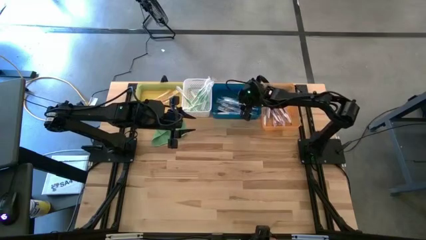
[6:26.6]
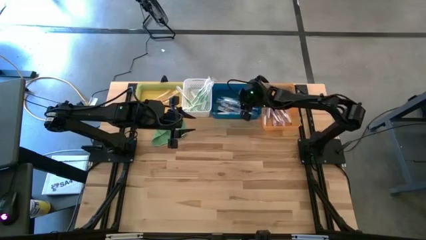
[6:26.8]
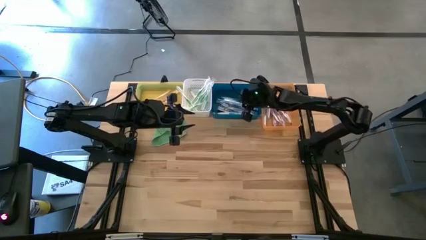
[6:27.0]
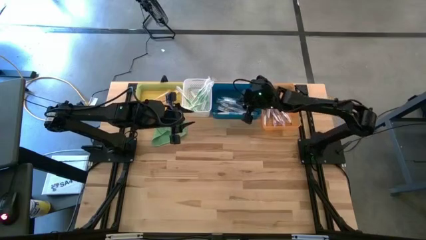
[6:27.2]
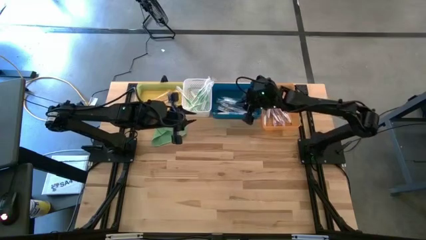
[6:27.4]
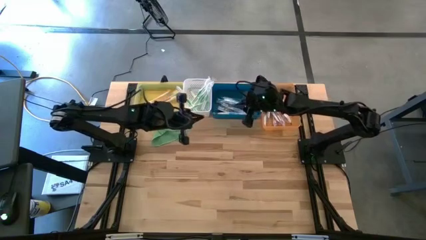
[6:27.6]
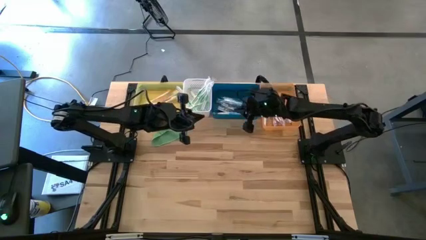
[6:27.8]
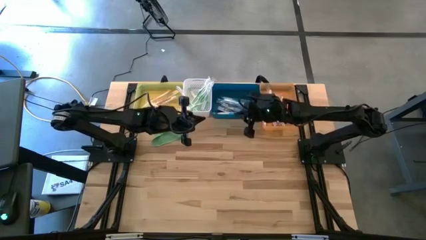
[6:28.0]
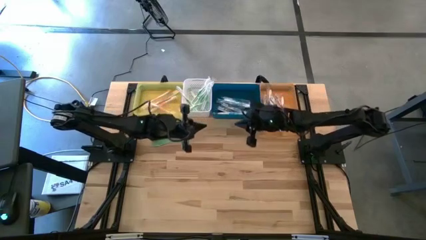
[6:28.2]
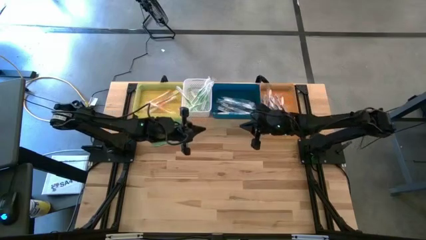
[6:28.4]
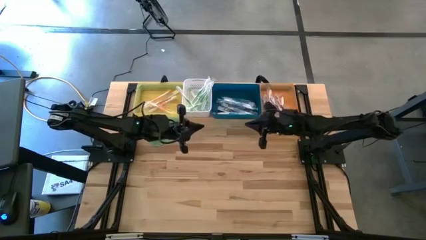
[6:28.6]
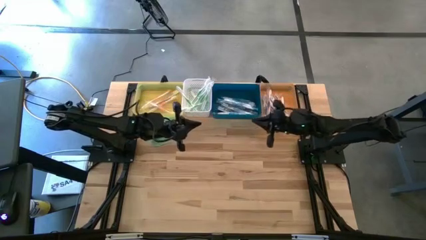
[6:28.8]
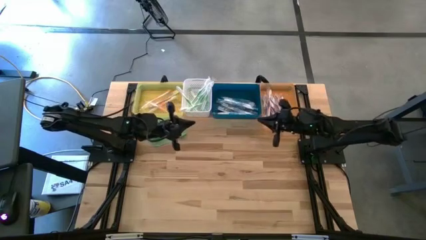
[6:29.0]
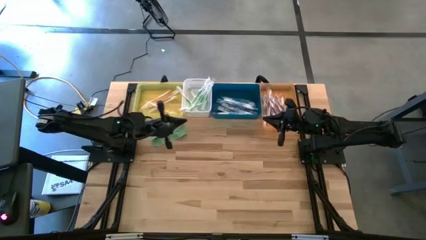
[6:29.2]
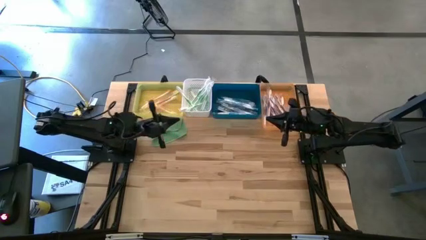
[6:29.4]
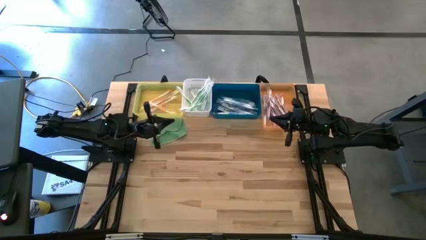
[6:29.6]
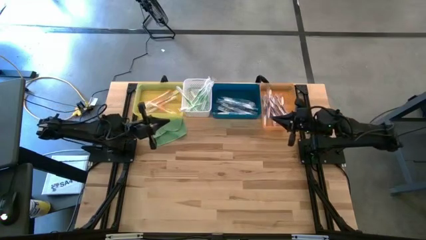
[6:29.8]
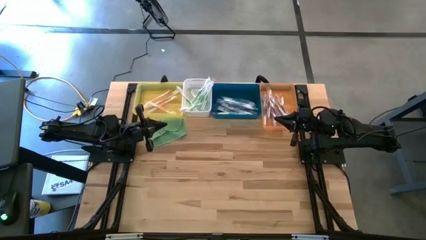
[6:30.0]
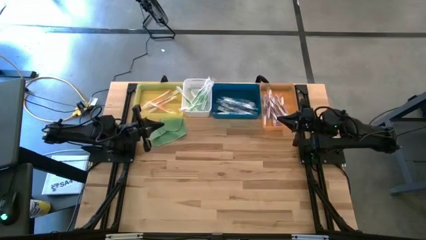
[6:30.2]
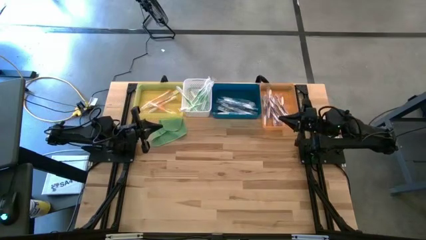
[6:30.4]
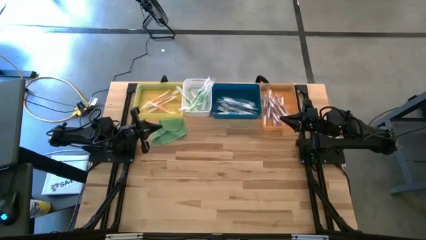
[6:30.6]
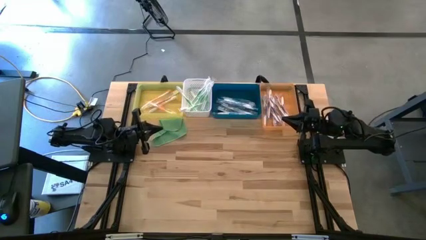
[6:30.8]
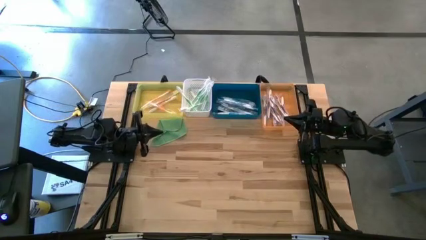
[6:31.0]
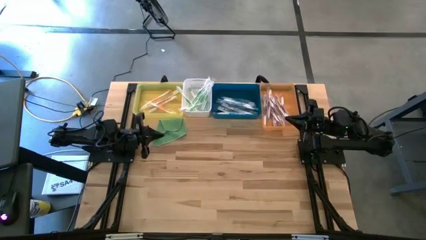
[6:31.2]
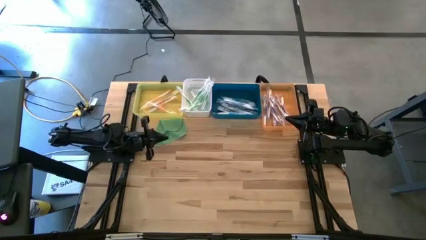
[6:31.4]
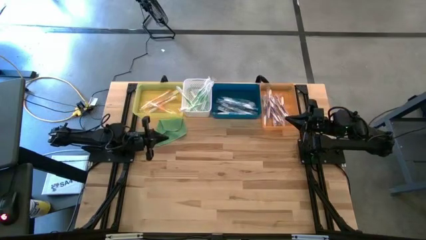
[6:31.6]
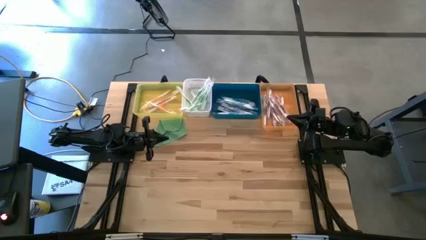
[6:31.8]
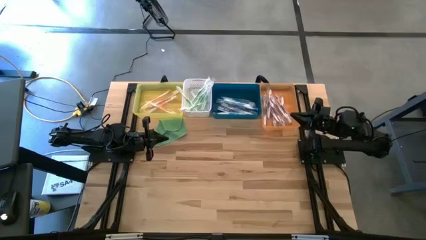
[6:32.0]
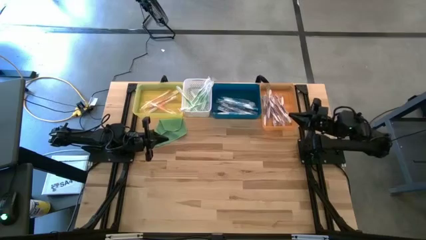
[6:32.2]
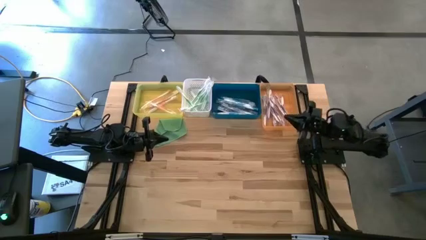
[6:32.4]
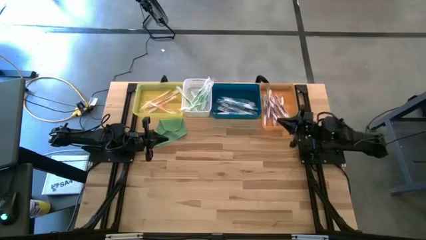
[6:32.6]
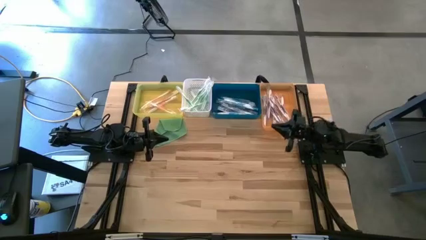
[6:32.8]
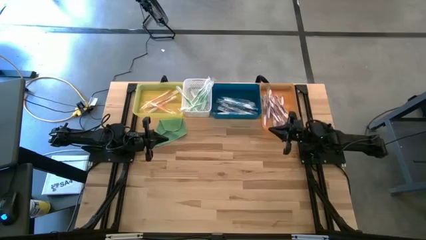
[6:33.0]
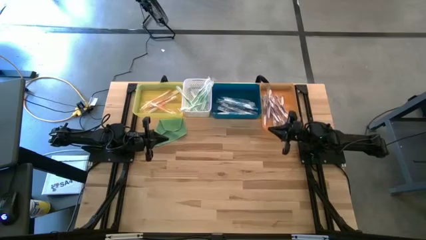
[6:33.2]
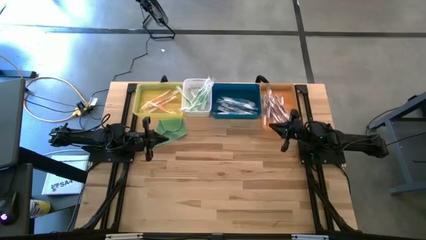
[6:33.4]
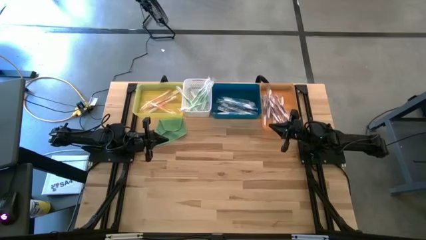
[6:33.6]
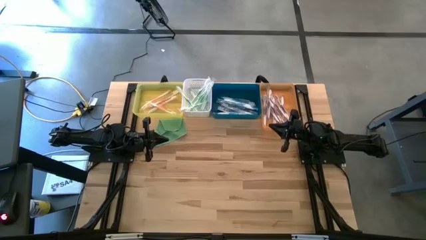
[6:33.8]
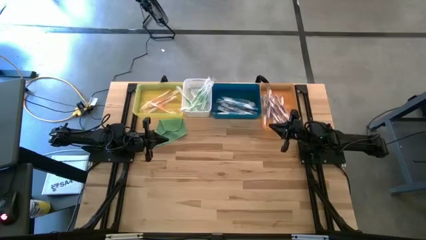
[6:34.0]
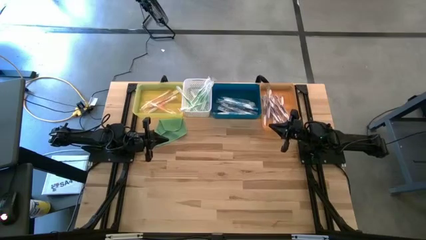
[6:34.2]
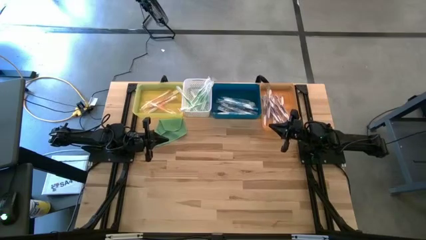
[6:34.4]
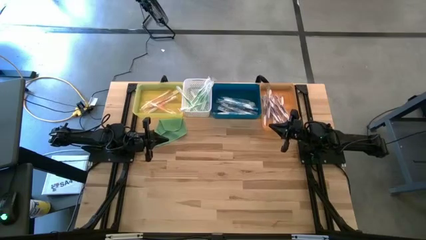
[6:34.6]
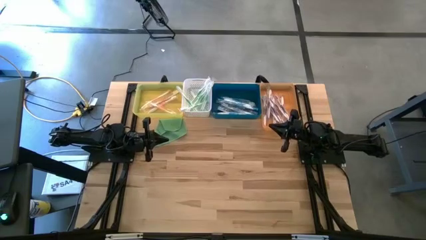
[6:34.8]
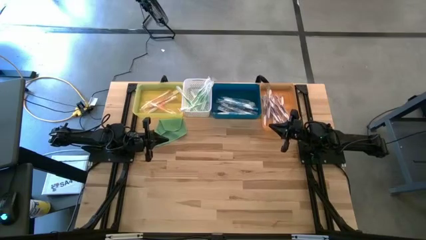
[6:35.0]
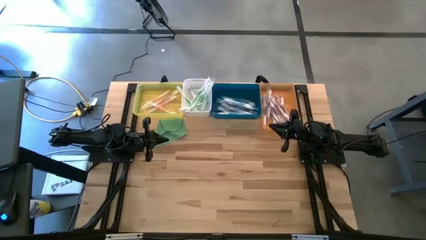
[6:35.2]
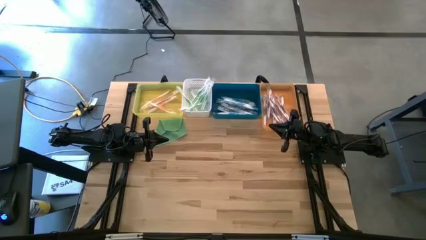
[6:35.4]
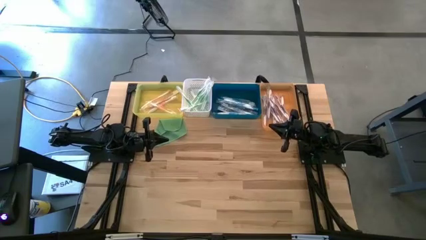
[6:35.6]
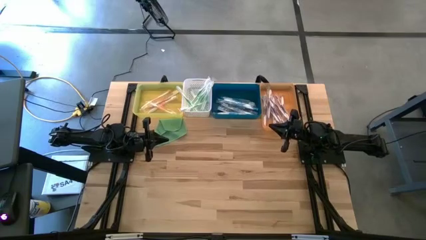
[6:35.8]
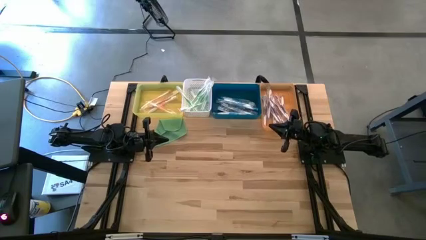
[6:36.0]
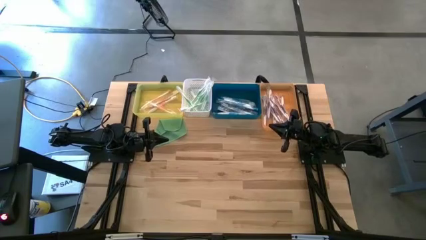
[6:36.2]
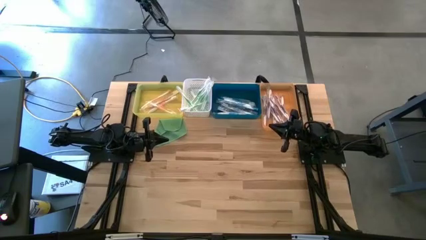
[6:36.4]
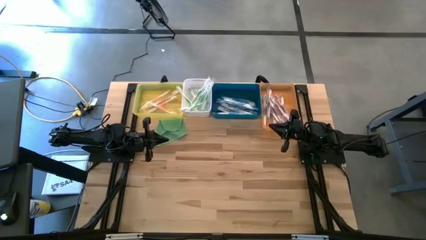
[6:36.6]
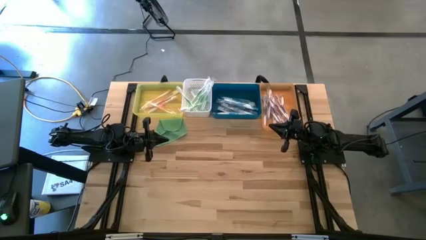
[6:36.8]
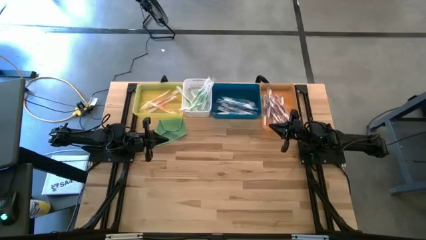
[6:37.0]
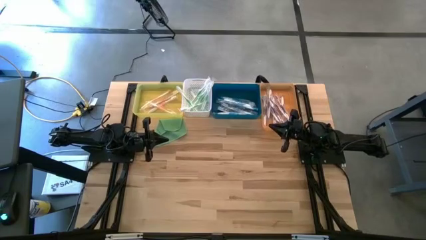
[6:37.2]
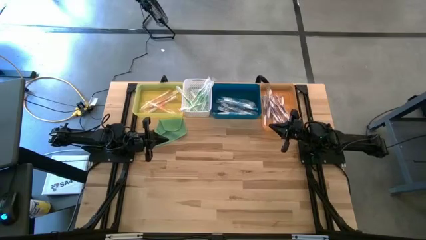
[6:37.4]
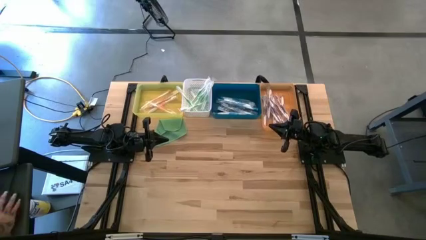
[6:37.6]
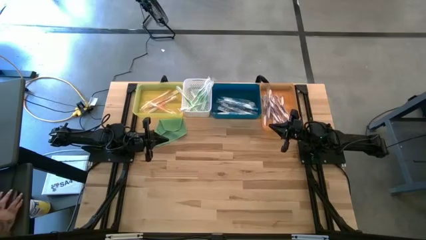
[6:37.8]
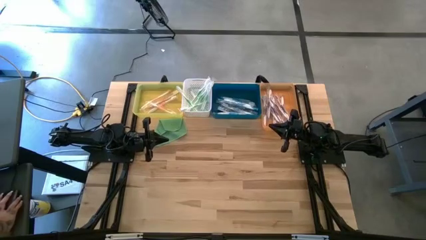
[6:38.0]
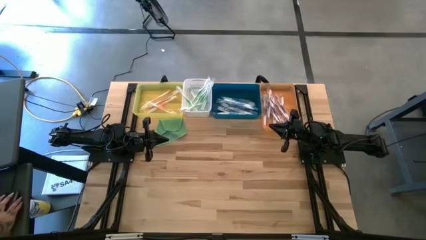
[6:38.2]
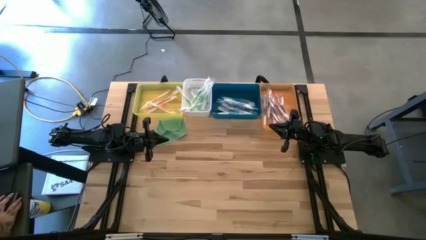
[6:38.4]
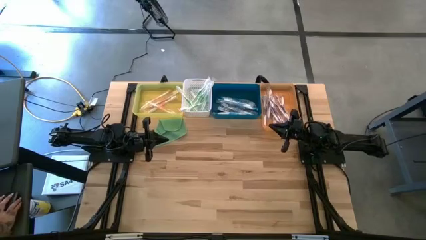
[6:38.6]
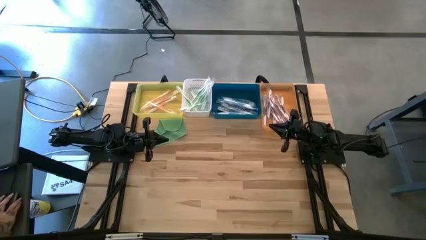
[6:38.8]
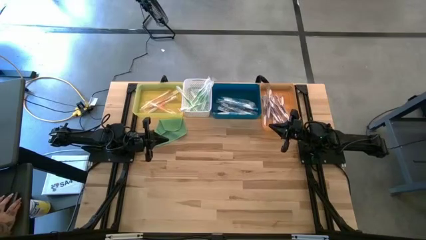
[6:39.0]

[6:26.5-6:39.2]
Task: Pick & Place Toothbrushes
Return to Home Position

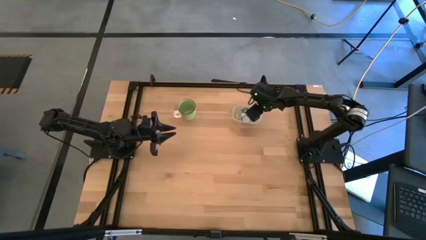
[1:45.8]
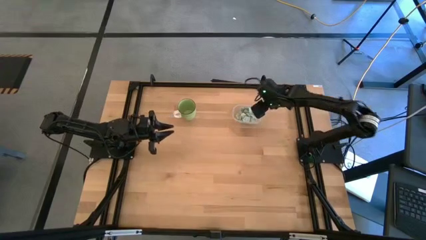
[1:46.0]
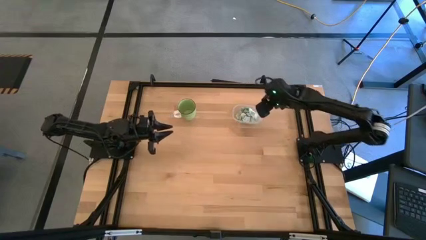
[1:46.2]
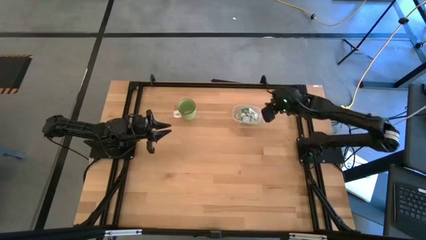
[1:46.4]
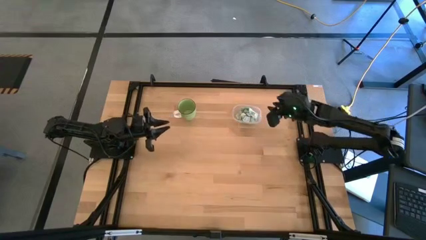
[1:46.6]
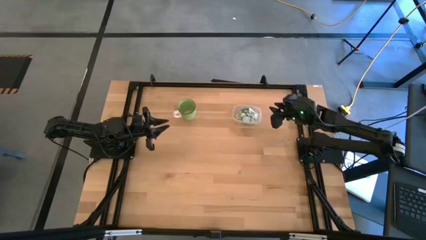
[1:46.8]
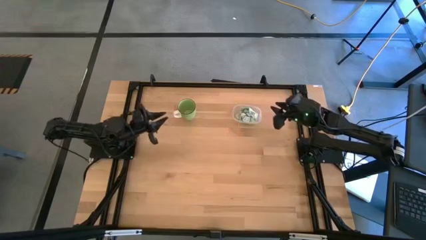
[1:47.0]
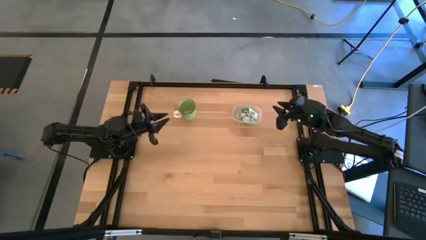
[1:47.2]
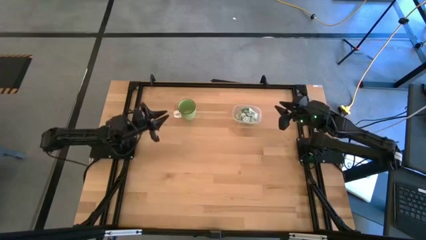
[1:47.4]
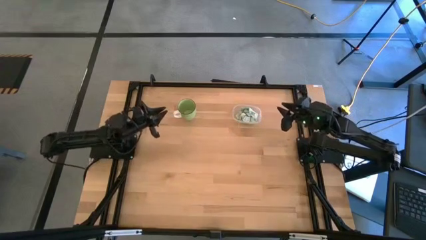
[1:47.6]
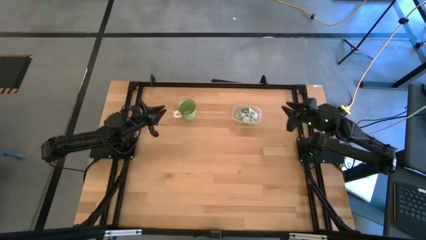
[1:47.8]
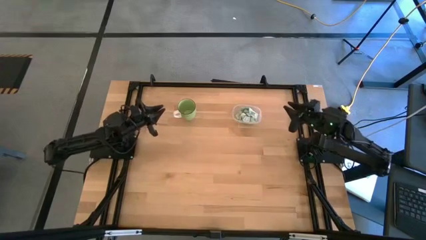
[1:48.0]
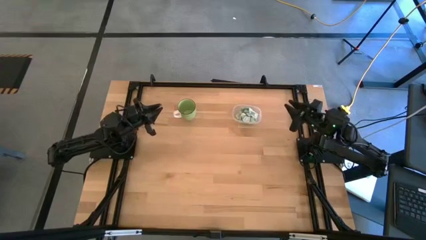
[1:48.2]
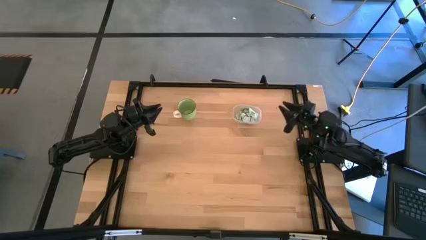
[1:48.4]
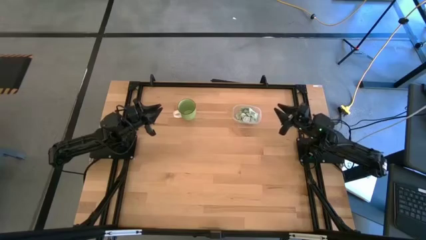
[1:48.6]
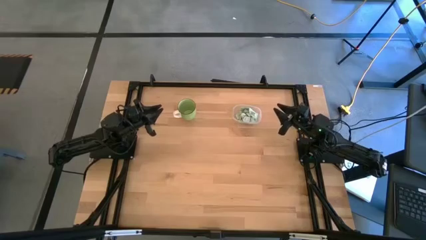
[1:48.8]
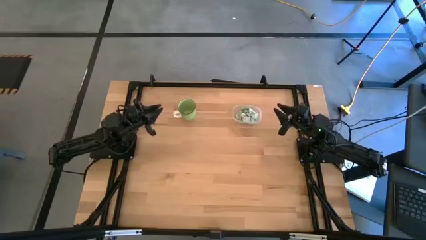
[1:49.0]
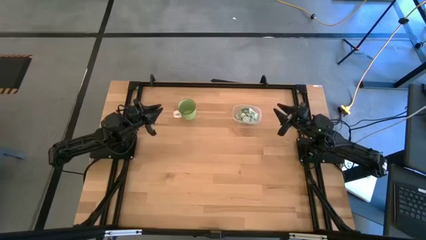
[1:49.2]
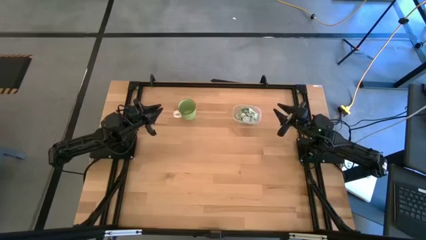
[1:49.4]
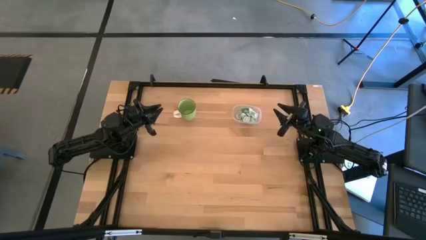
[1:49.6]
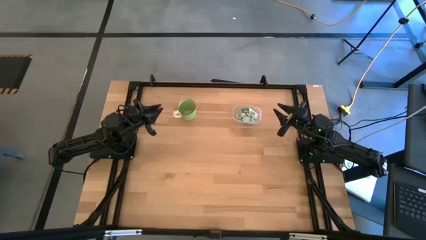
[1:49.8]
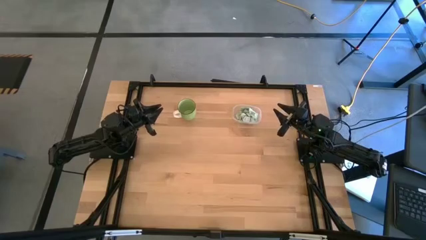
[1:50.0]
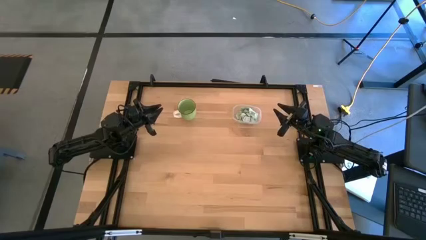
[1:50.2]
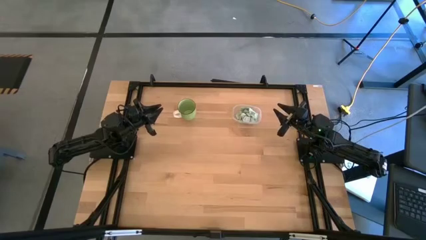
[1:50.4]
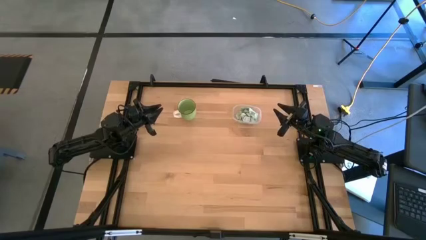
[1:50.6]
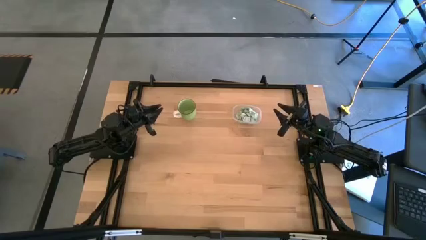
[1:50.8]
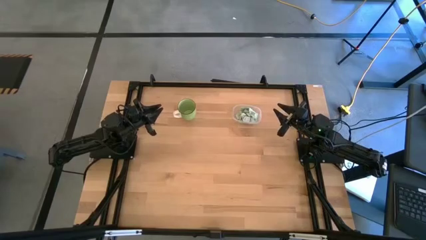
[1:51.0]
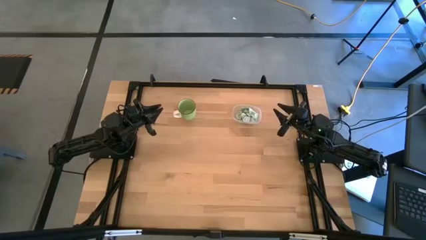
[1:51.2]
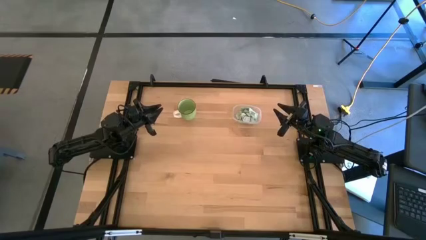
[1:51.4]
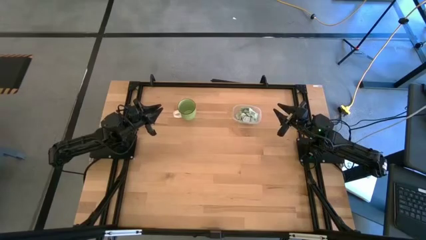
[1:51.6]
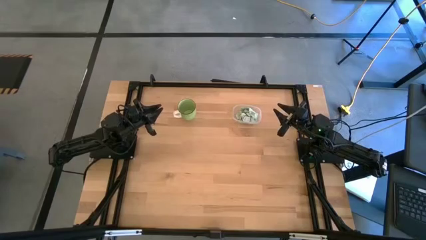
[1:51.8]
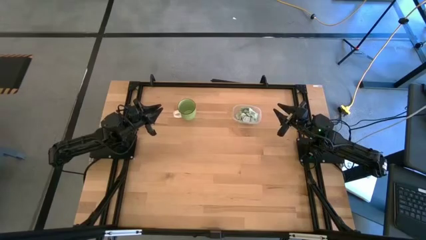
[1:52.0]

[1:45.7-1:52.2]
Task: Pick and place items into bin
Return to Home Position
